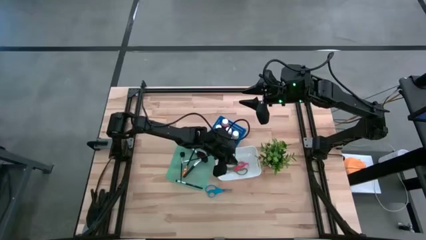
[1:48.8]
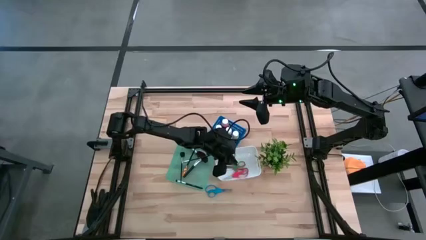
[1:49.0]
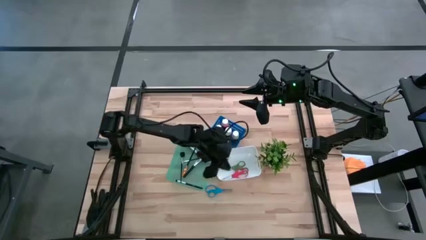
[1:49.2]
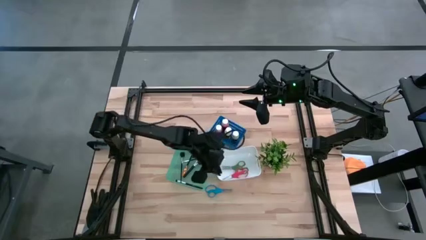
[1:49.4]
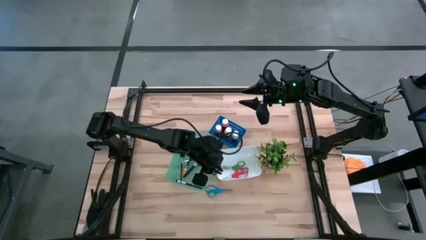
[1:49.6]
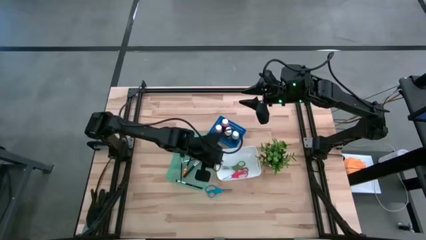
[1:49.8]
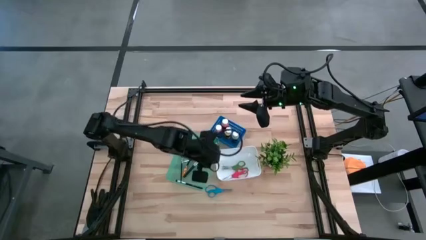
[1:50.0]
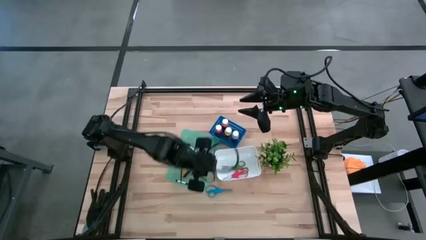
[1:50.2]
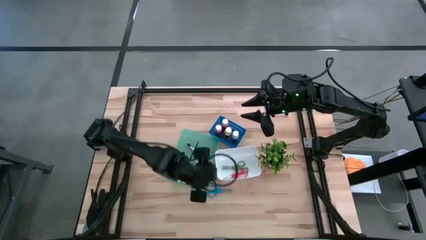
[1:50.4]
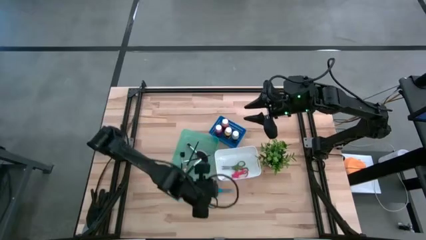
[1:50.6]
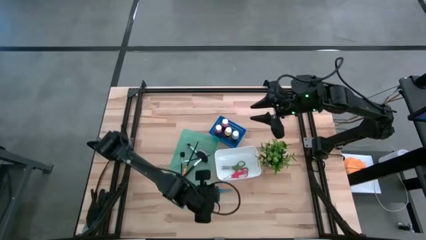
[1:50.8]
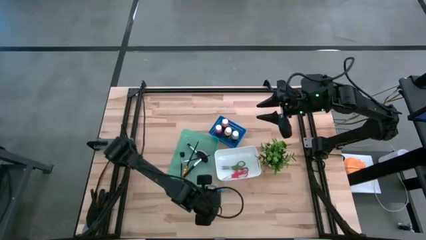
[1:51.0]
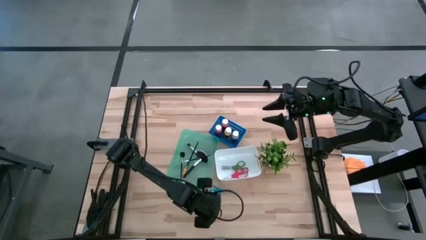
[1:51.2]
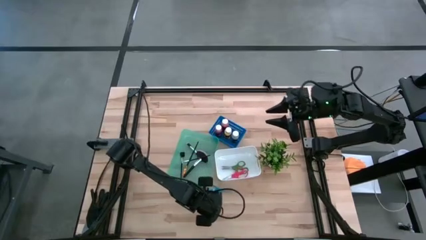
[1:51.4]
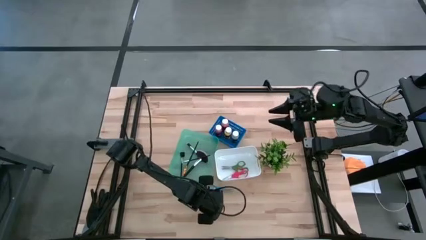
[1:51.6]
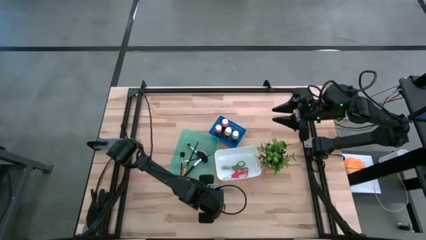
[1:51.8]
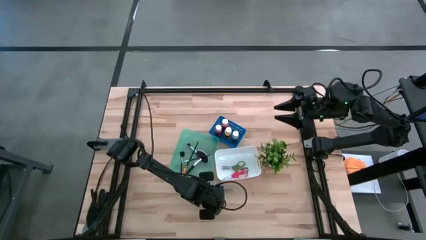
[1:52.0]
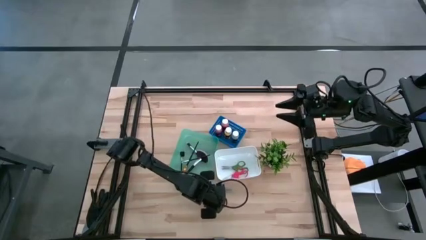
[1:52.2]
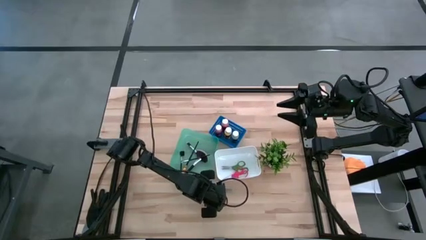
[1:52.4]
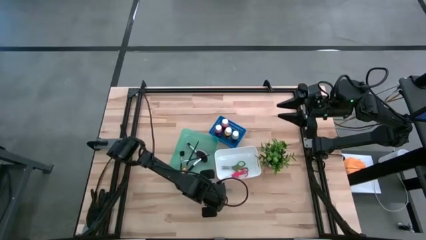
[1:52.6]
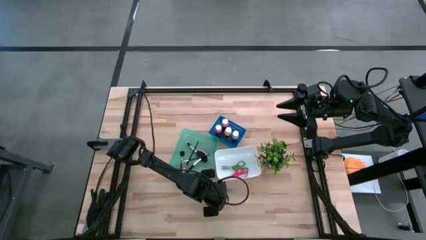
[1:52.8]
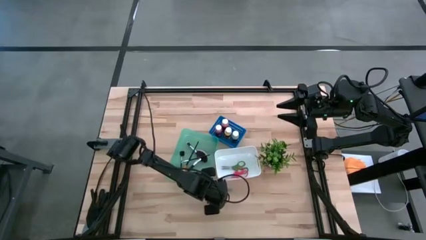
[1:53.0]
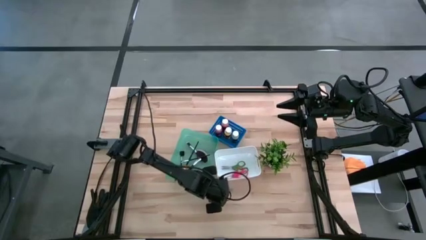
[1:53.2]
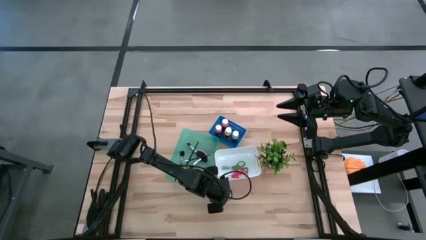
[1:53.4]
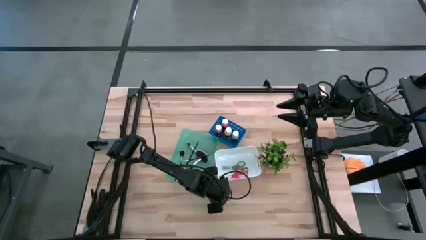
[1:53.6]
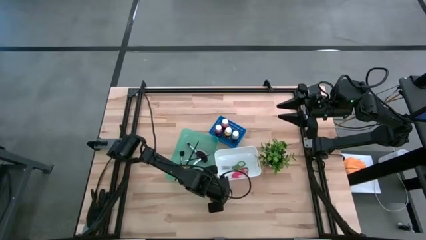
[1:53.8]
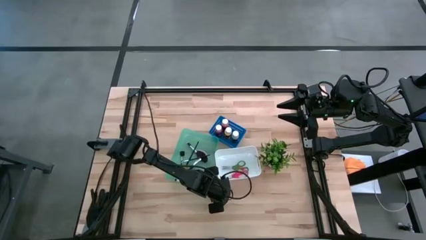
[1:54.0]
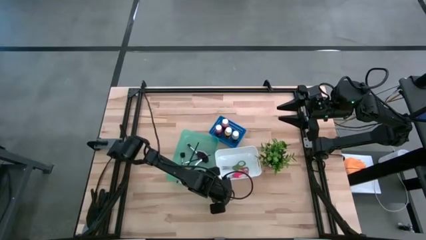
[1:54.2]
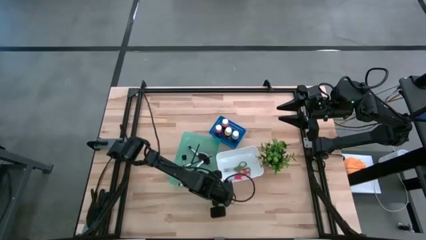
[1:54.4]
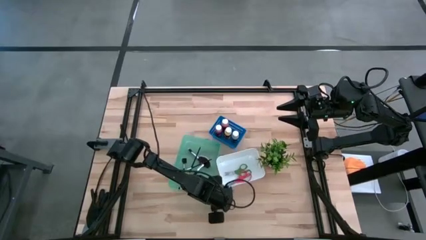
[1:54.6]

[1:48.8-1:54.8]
Task: Pick & Place Paint Supplies
Put the blue scissors into the white bin

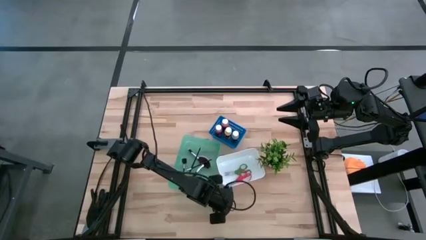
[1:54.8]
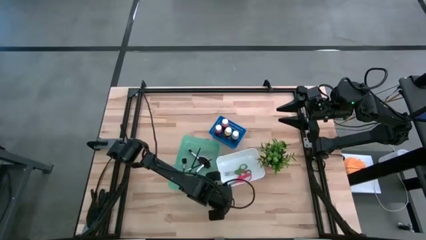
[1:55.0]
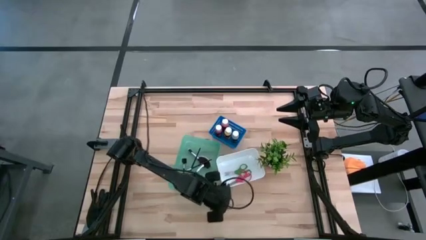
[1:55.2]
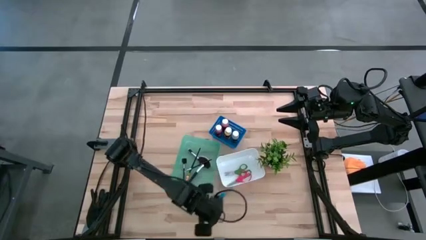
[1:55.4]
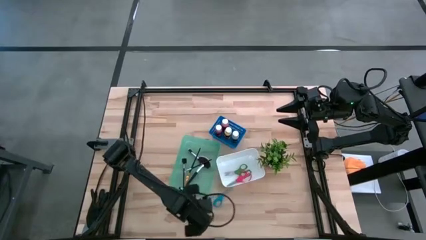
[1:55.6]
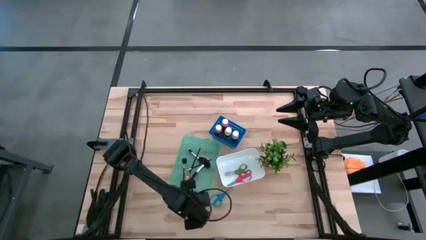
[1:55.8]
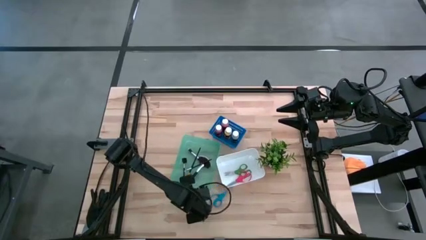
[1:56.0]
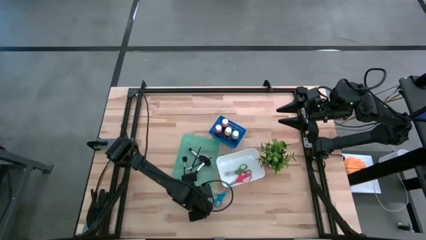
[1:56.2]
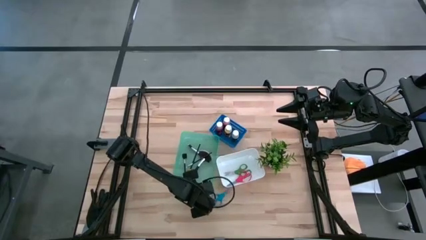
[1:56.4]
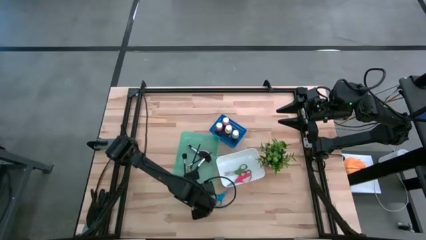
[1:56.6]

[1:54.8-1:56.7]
Adjust the green bin

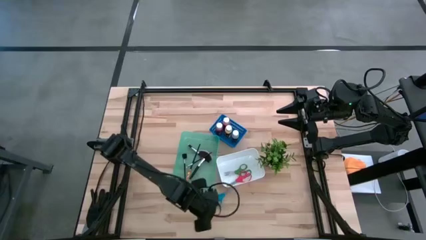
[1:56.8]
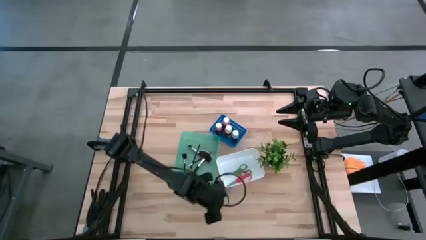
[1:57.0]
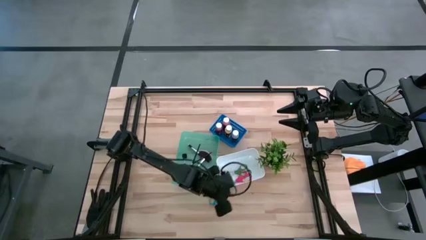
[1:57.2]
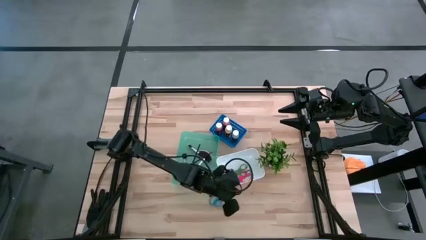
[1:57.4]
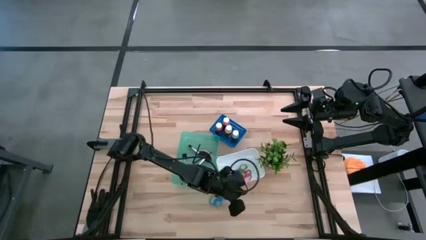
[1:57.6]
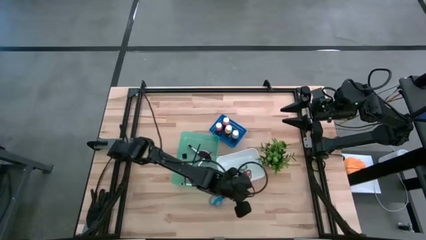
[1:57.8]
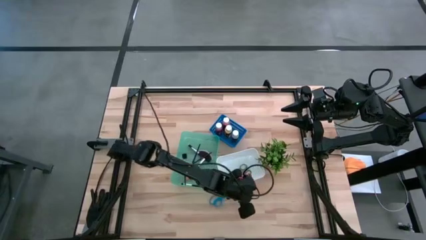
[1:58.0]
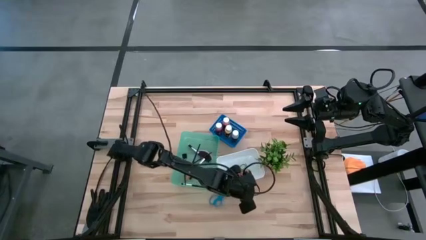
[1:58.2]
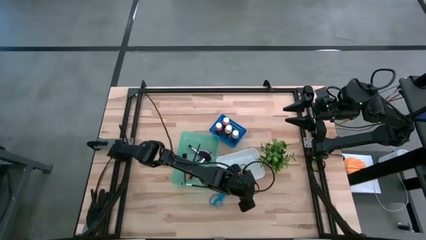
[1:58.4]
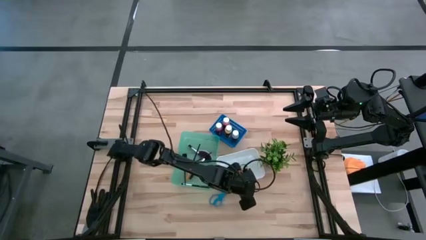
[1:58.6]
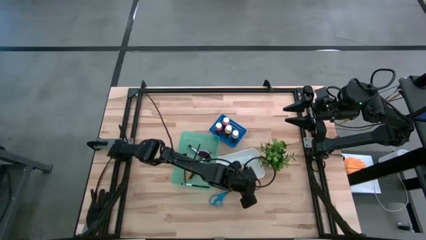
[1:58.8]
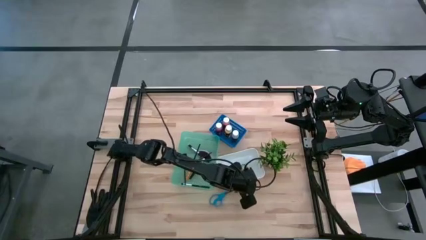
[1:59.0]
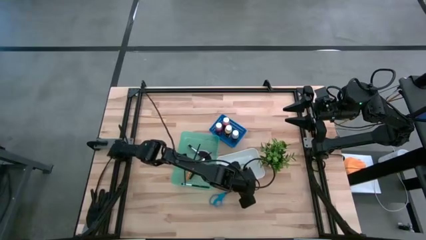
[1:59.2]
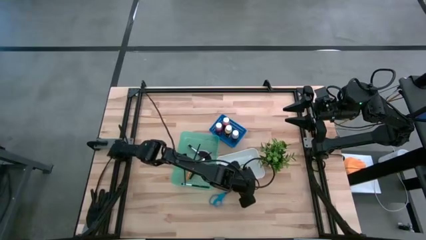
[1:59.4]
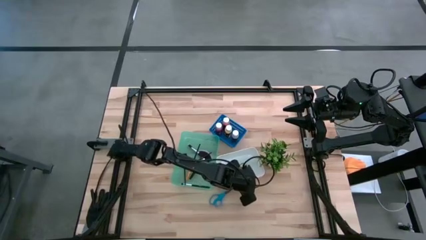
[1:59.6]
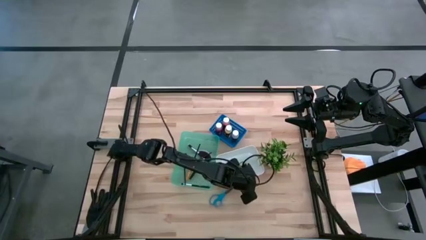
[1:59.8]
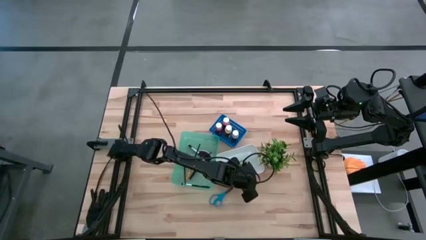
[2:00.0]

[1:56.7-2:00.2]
Adjust the white bin

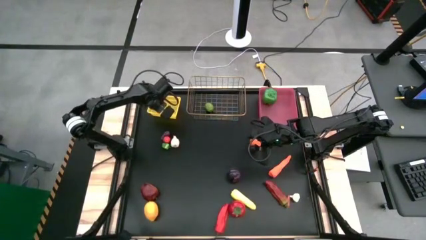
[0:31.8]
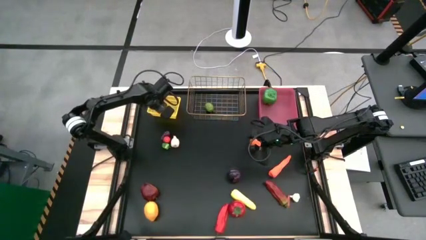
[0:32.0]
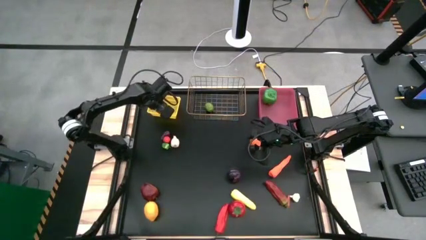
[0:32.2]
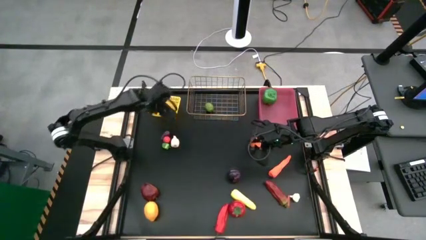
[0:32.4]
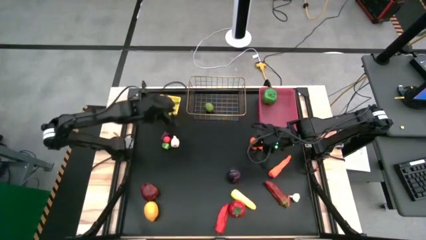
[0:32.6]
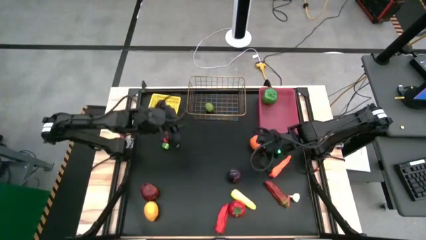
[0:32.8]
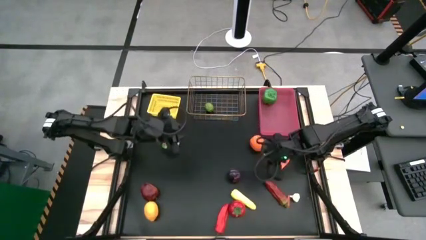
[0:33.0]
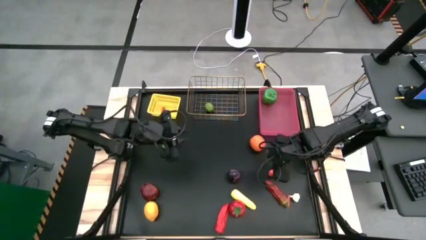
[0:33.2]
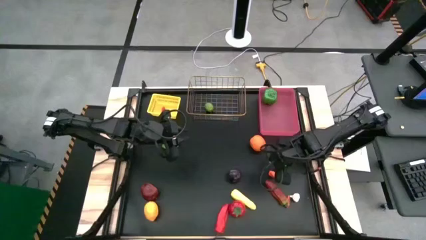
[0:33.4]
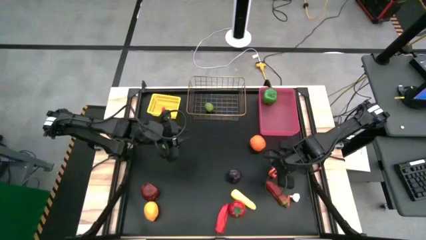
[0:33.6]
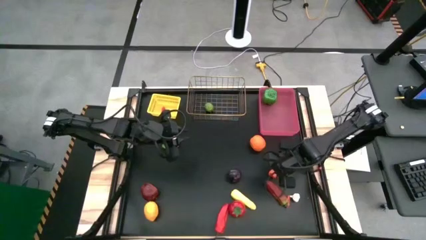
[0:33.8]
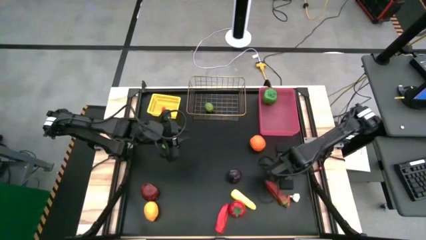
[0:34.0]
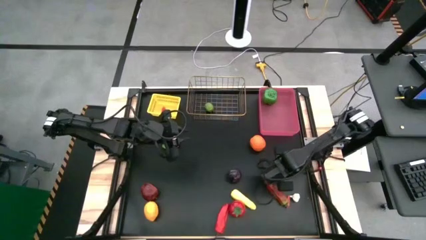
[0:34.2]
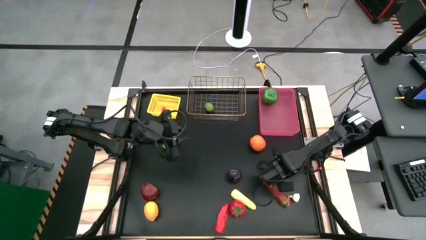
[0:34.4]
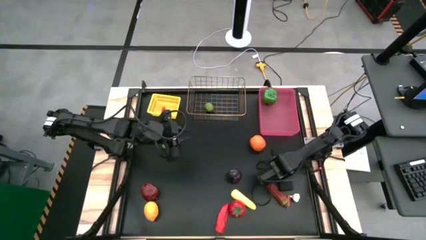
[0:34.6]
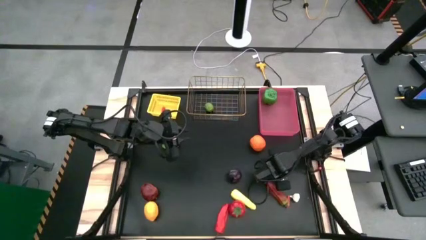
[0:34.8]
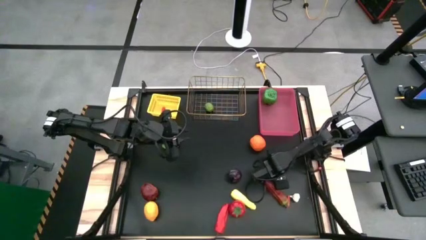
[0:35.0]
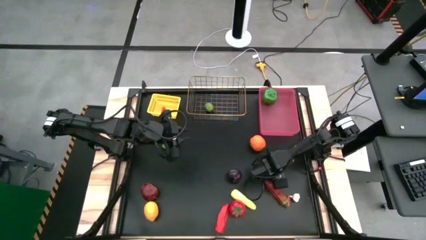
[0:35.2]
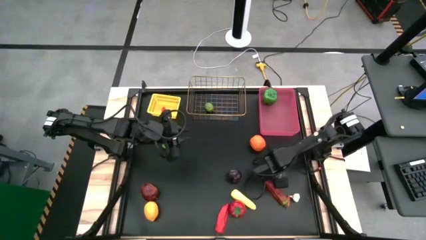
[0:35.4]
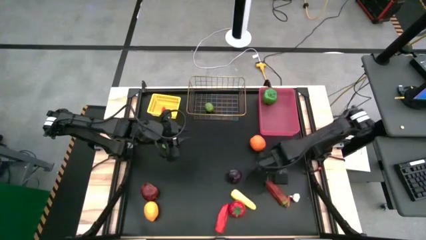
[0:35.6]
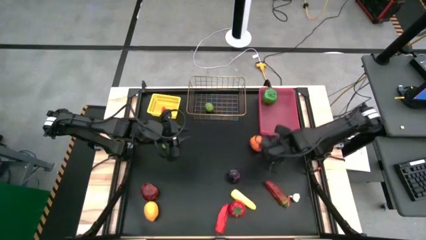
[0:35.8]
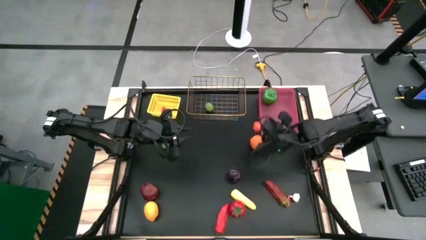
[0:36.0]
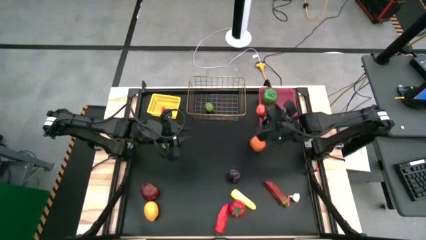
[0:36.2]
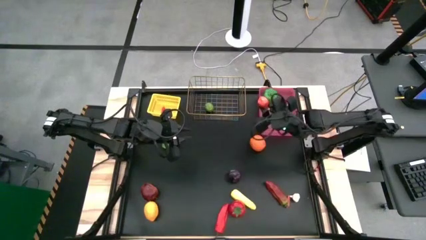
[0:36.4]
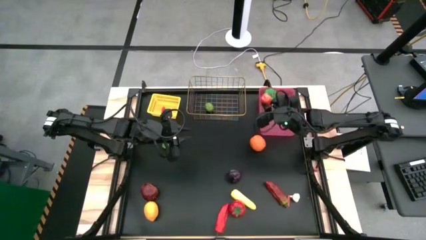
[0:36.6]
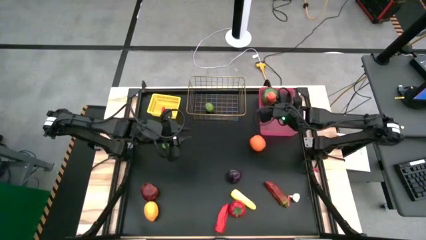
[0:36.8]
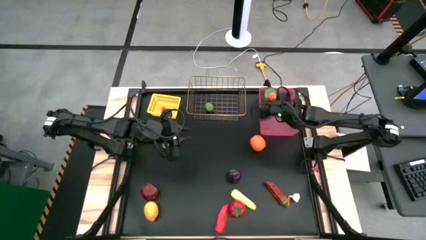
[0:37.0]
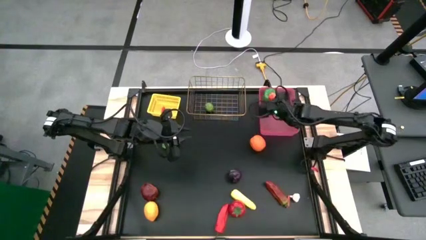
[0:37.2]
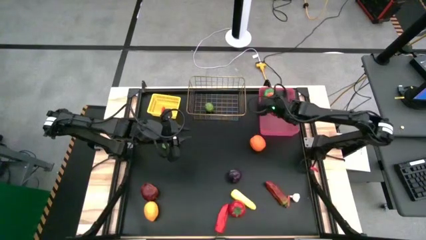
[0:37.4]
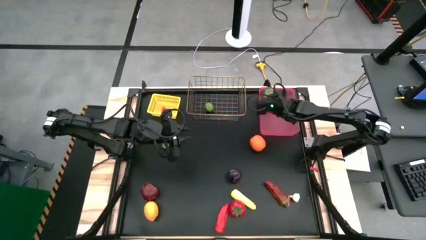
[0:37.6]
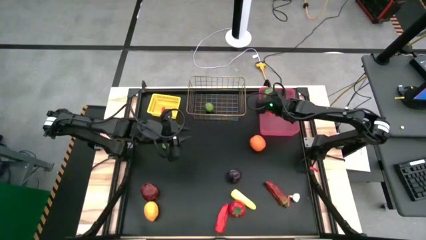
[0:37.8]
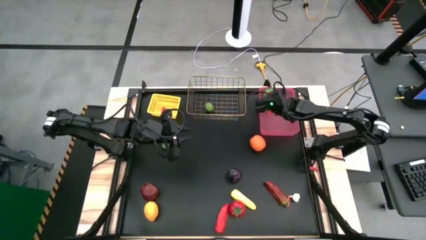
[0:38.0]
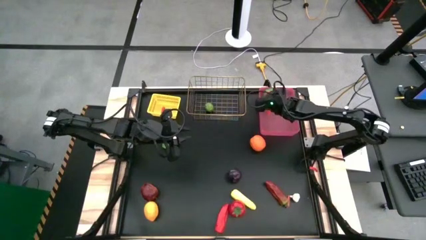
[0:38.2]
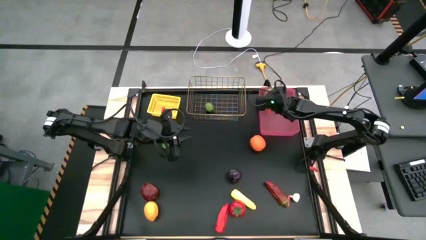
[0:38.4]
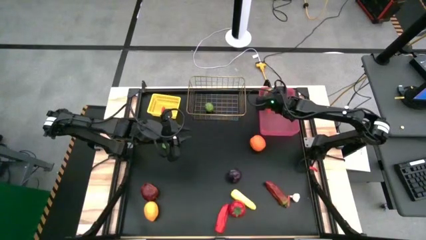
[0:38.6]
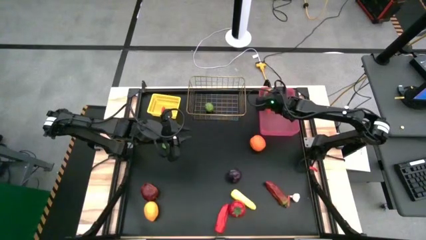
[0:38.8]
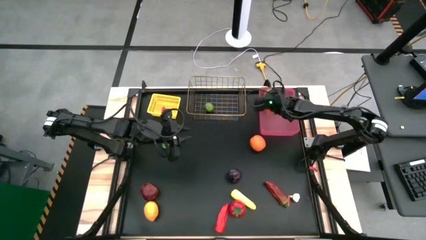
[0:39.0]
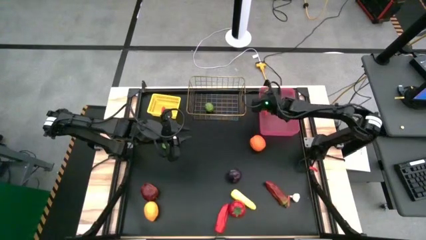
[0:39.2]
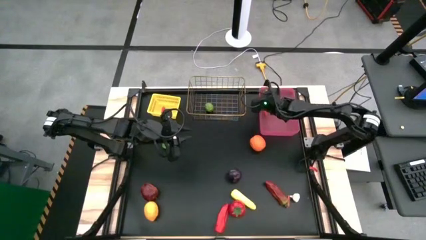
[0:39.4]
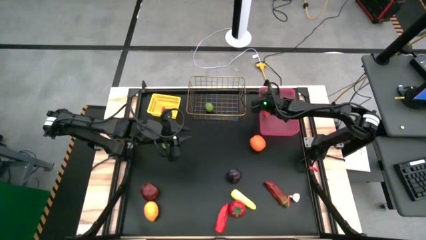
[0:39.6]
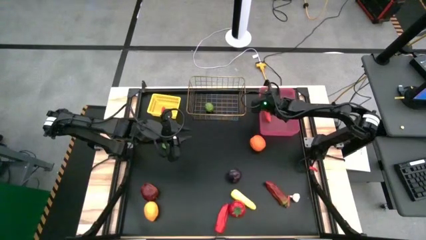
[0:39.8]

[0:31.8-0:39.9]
Task: Sort produce into baskets
Put the large orange carrot into the pink bin
